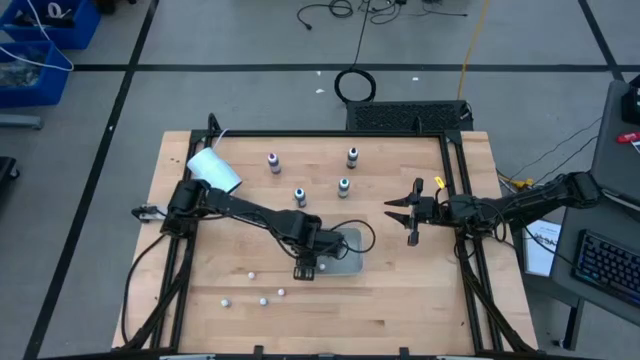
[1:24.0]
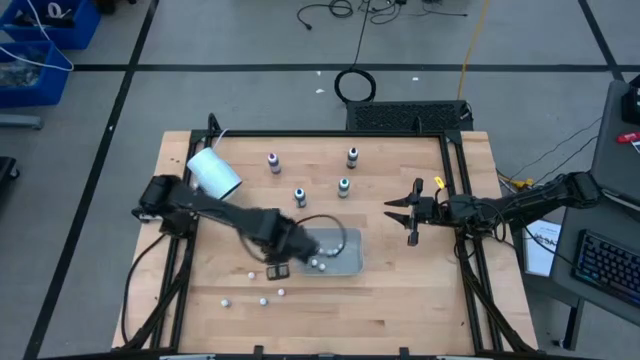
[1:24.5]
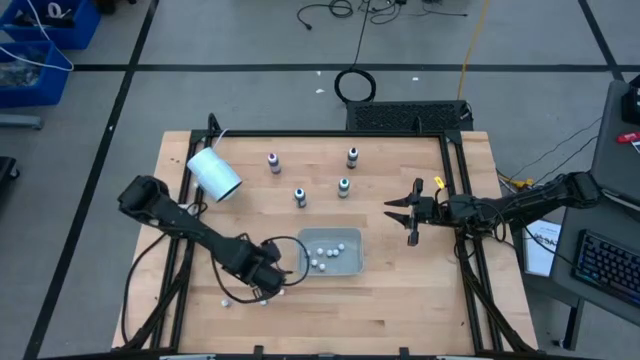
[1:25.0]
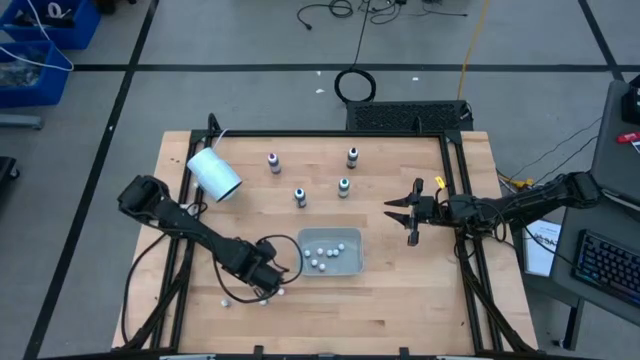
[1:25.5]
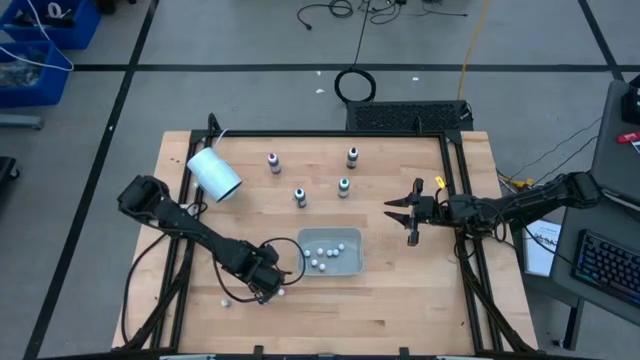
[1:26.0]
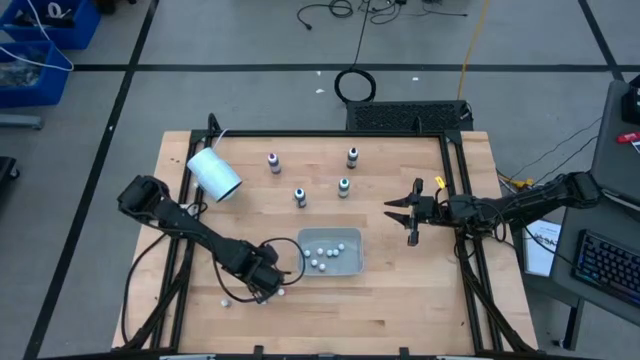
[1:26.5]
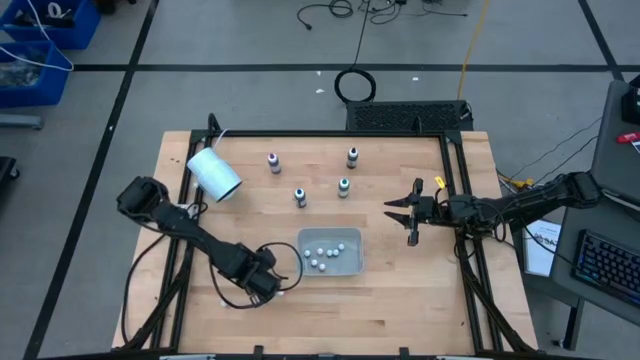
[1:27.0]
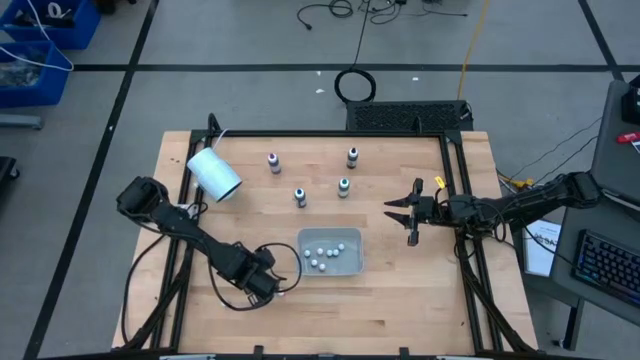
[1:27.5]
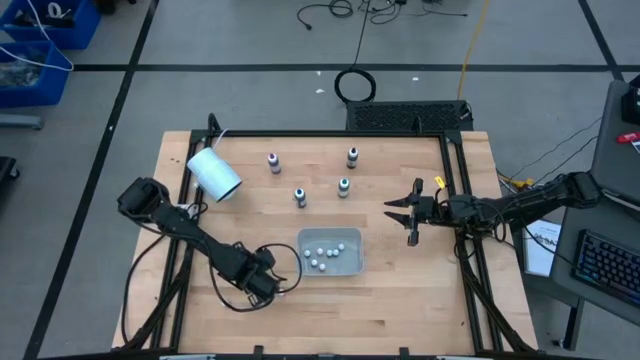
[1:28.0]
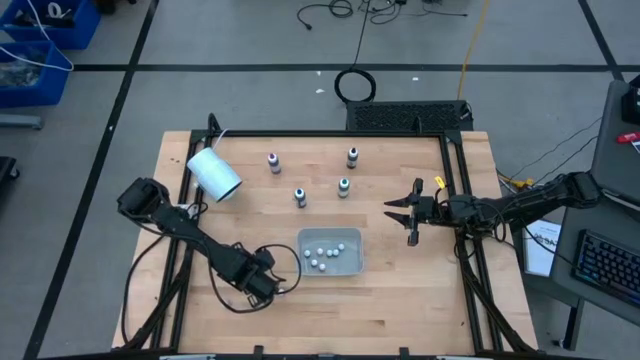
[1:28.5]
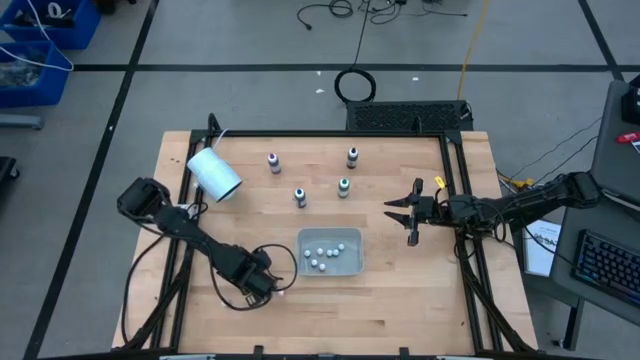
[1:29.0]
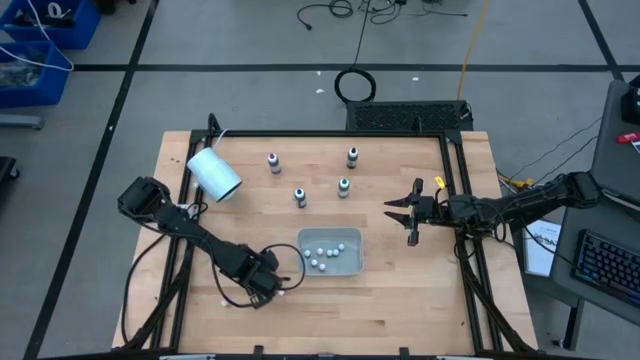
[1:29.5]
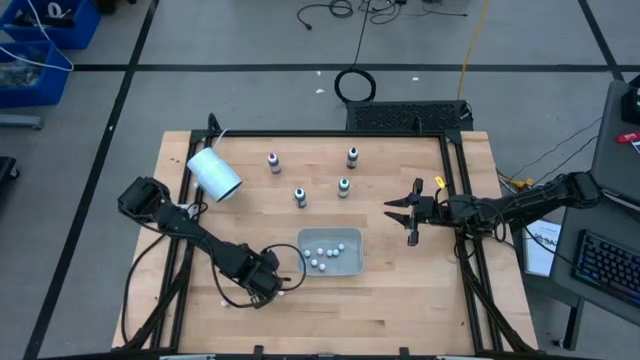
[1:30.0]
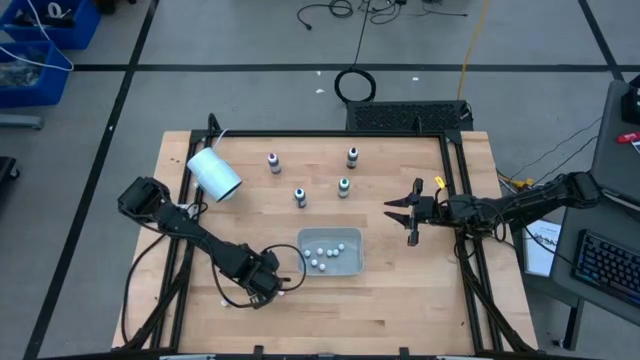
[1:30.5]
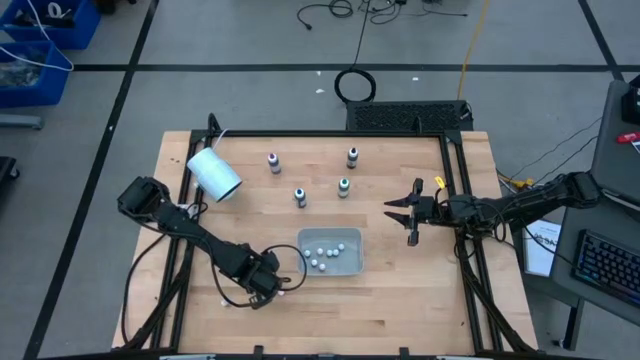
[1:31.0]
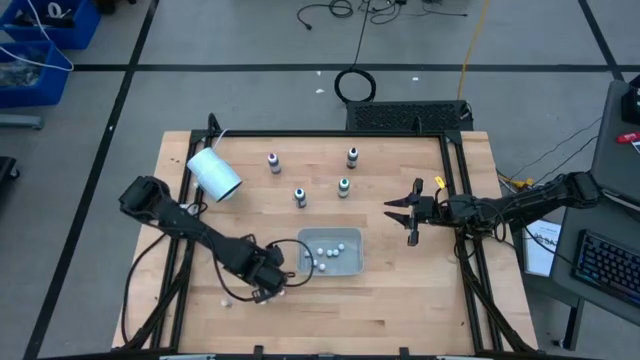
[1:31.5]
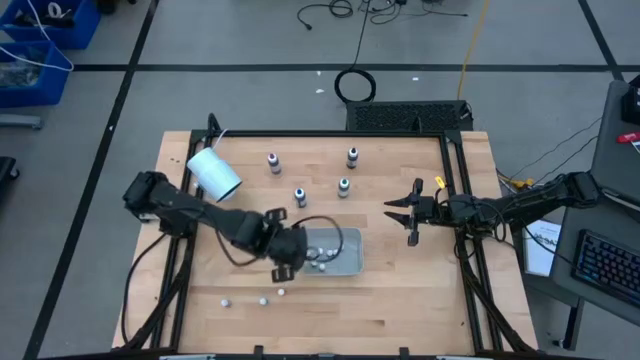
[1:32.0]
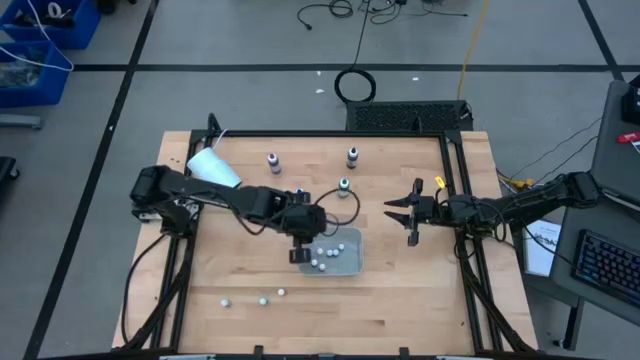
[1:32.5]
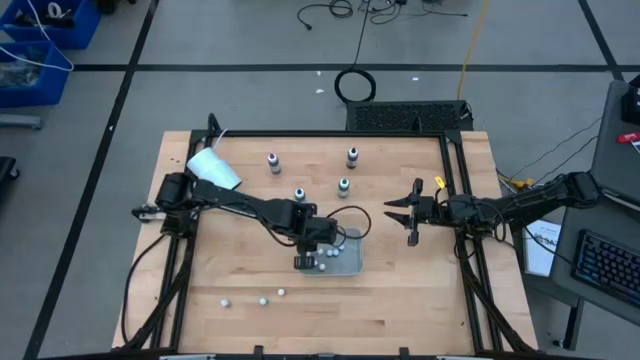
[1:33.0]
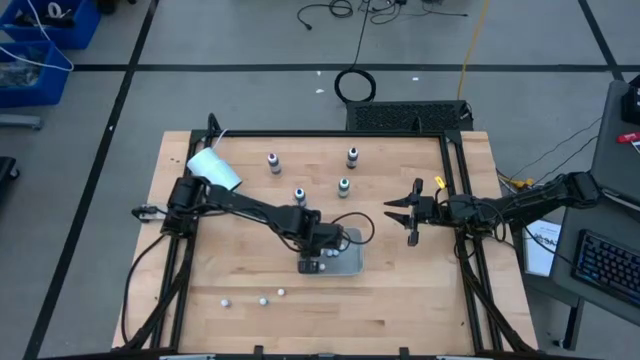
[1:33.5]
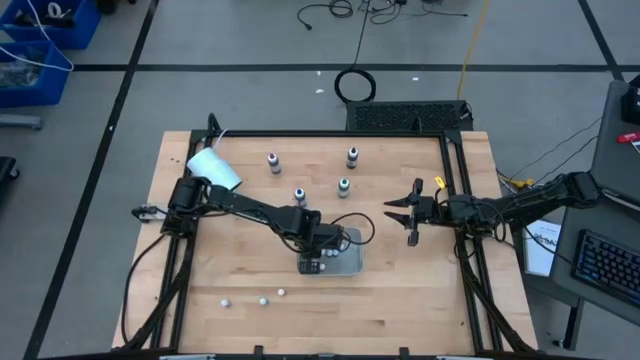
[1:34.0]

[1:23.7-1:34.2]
Task: Pick & Place food coloring
Put the orange food coloring bottle into the bin

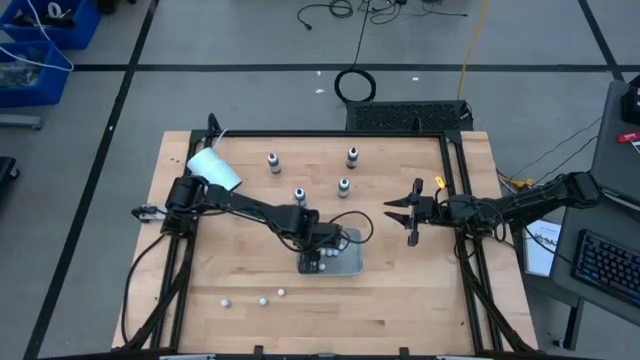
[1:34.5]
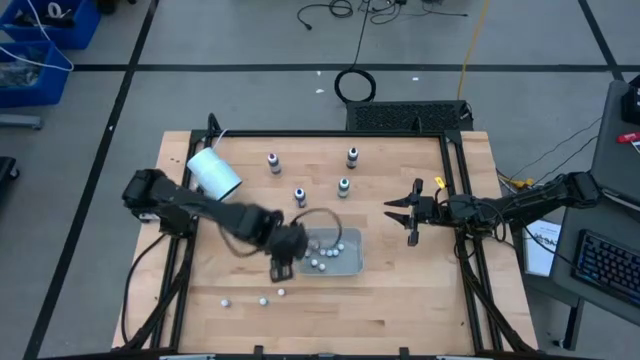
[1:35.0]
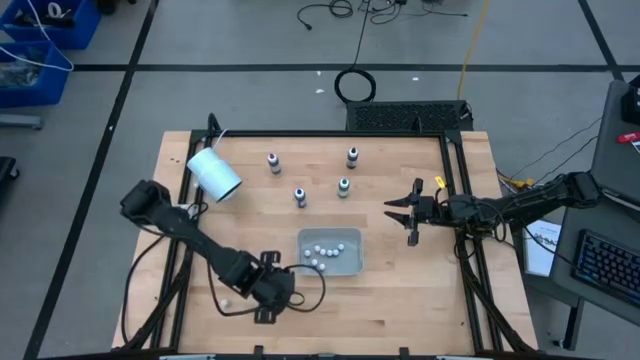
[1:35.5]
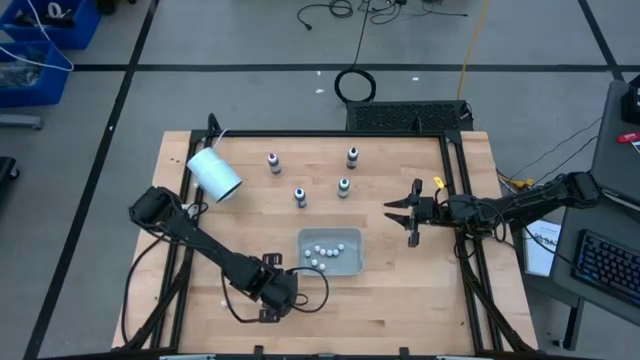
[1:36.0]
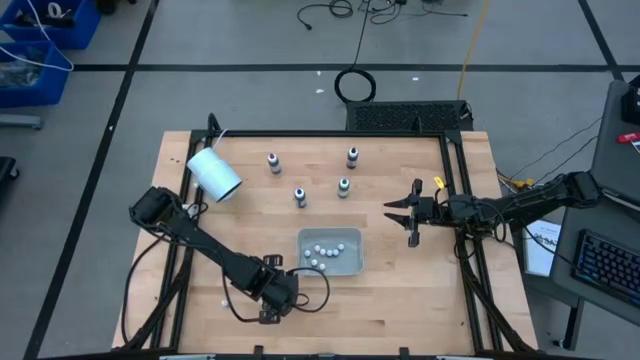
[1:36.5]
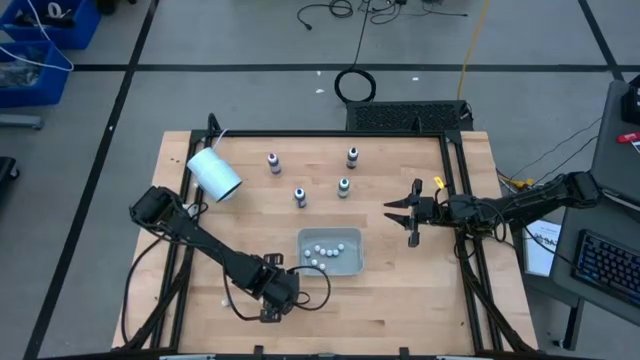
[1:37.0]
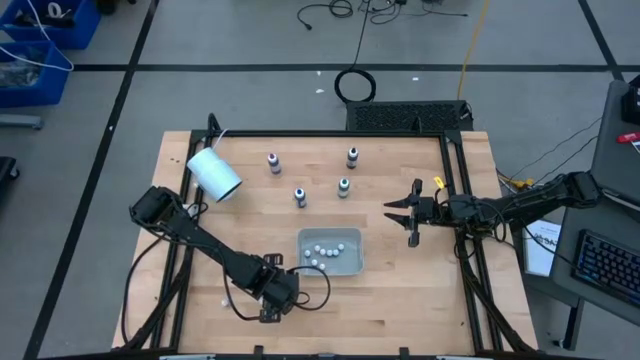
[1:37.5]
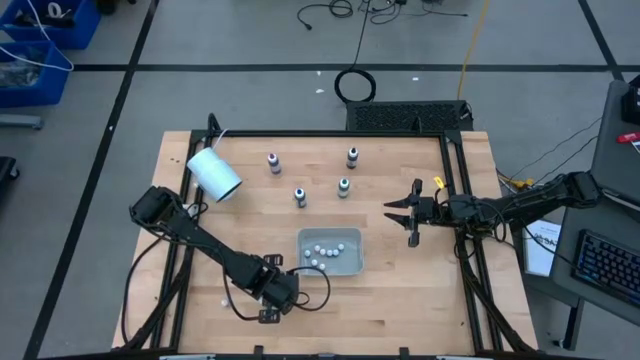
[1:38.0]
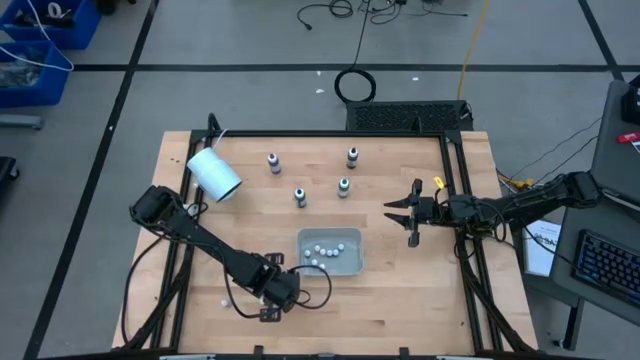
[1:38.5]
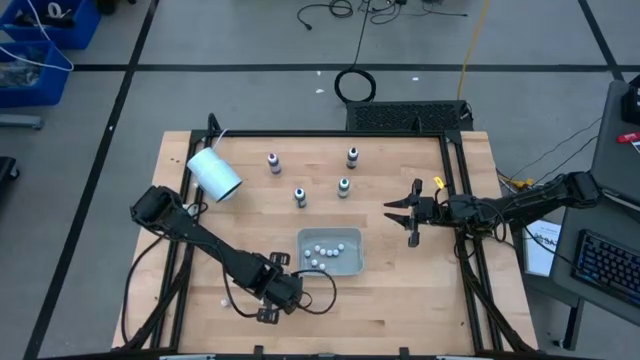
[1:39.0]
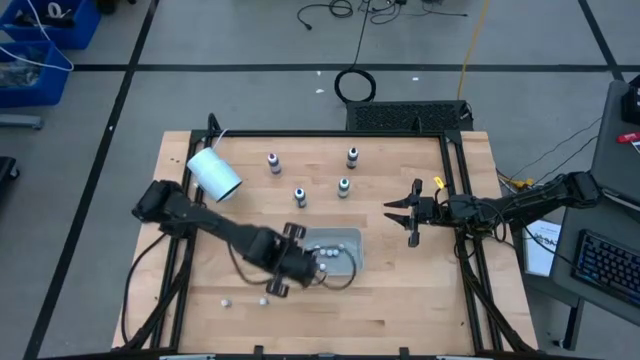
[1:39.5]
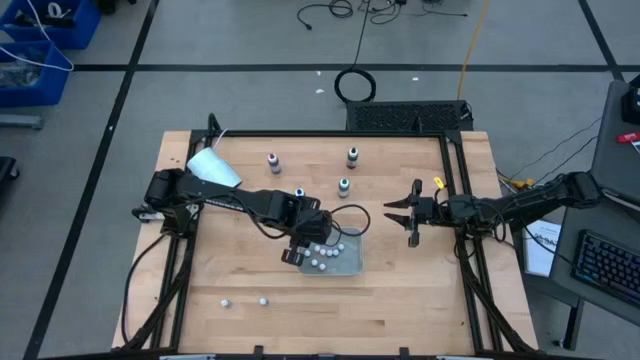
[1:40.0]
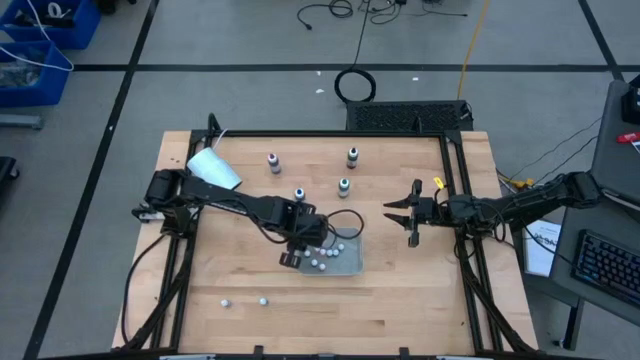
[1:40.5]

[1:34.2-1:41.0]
Put the orange food coloring bottle into the bin

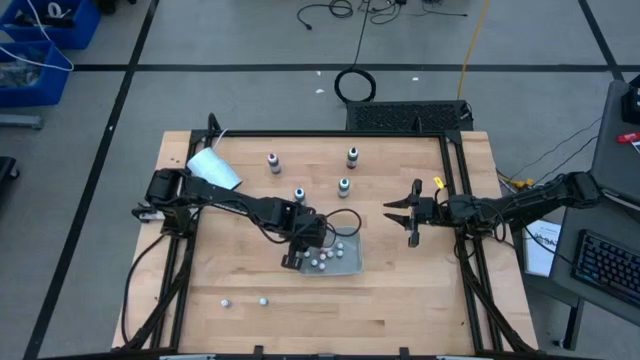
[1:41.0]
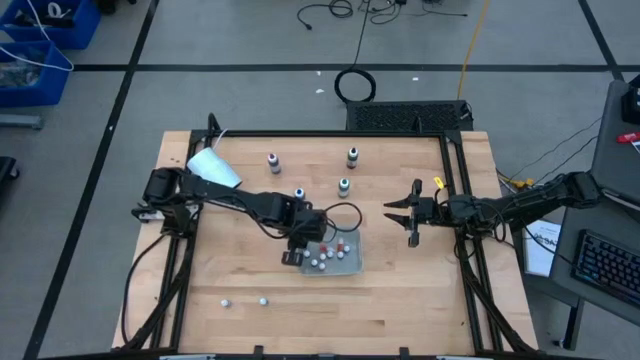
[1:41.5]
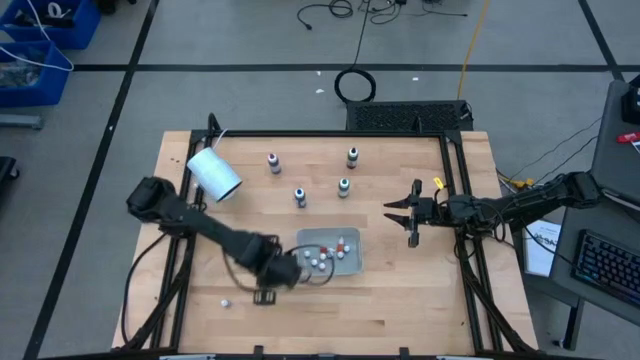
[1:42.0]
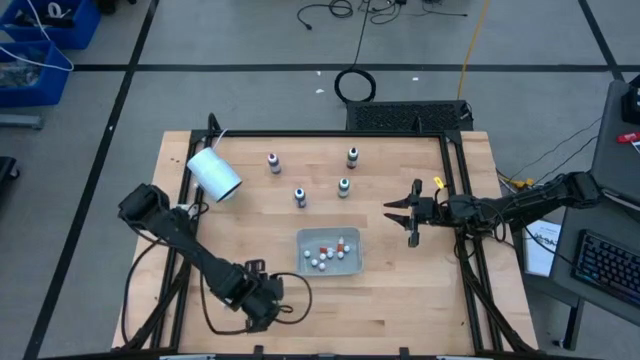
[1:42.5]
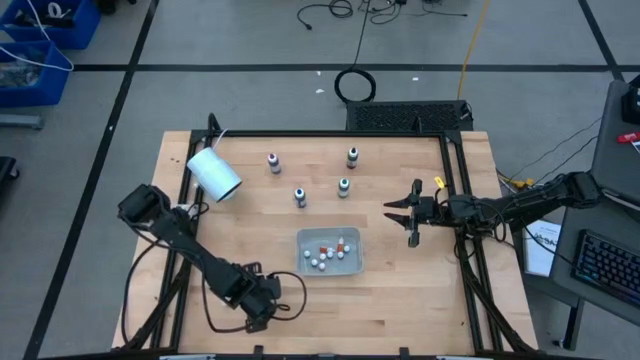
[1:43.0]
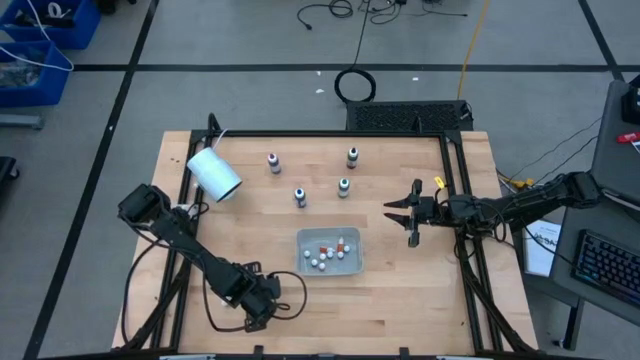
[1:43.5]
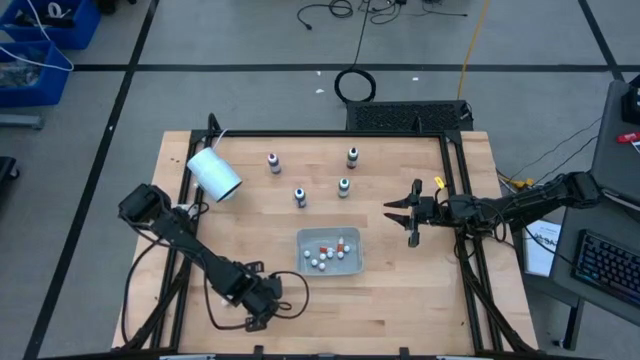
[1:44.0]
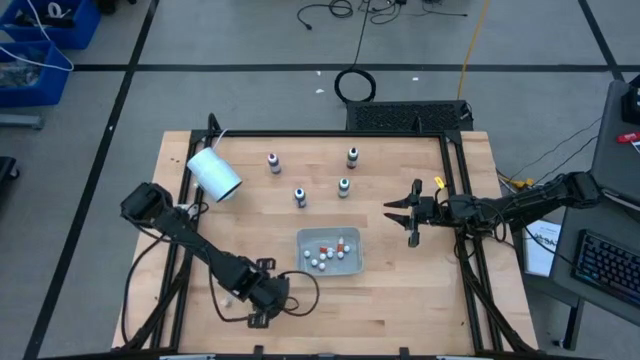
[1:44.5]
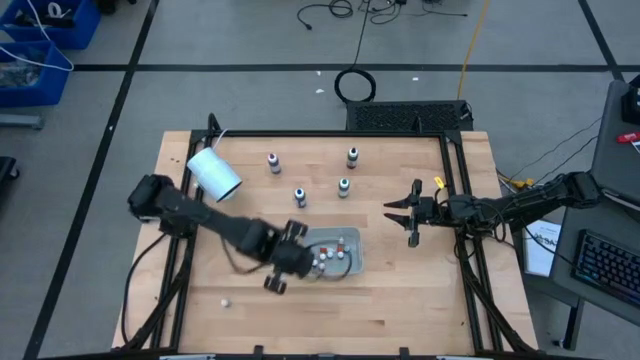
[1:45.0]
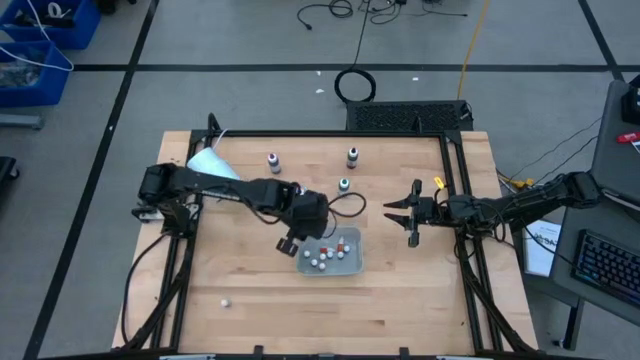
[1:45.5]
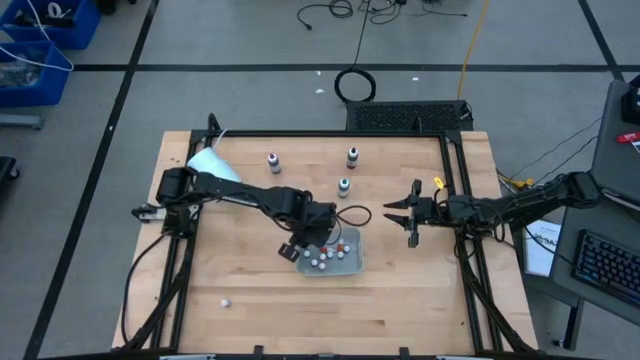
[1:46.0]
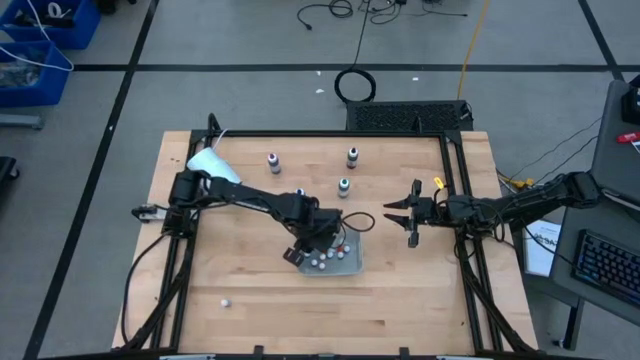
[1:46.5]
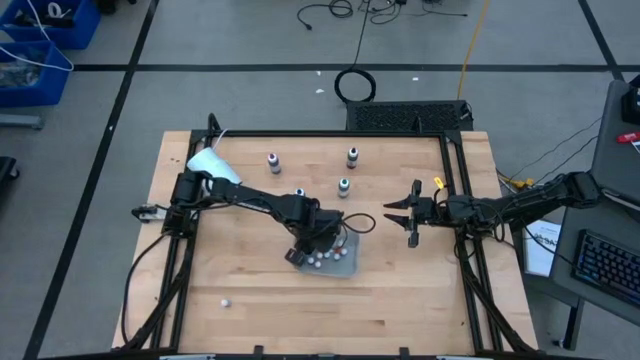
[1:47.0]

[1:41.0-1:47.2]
Put the black food coloring bottle into the bin
